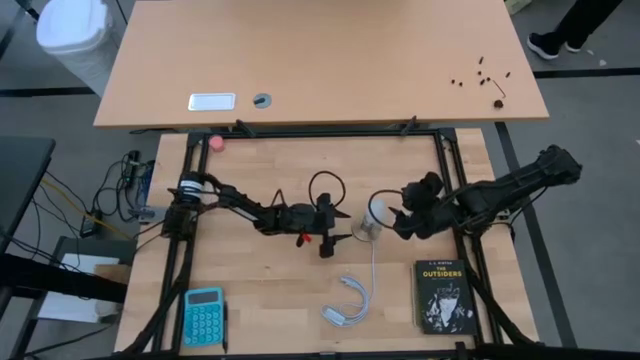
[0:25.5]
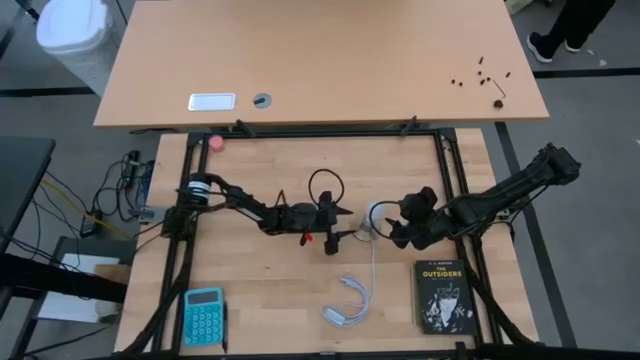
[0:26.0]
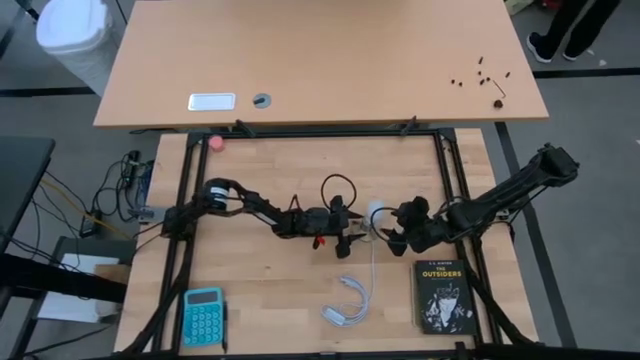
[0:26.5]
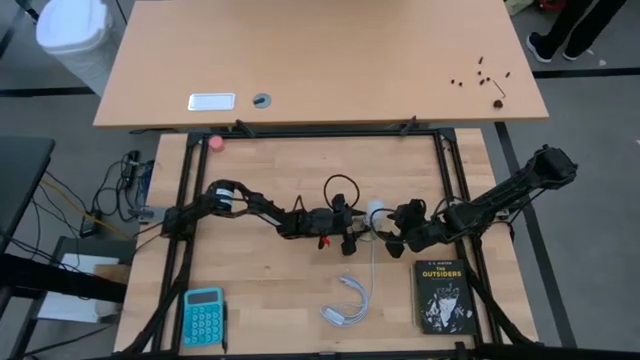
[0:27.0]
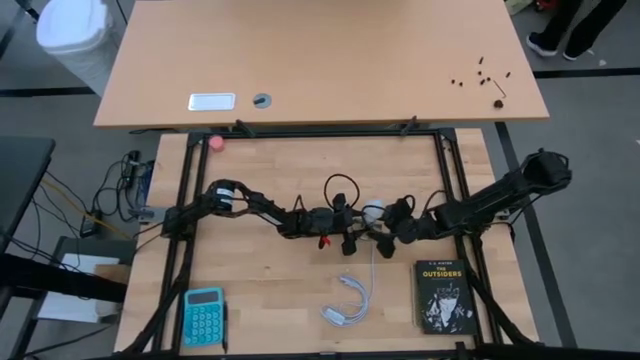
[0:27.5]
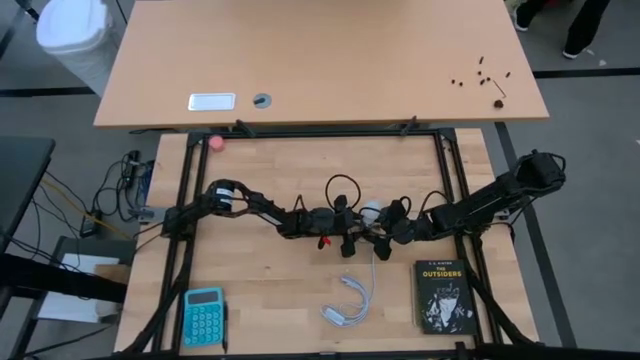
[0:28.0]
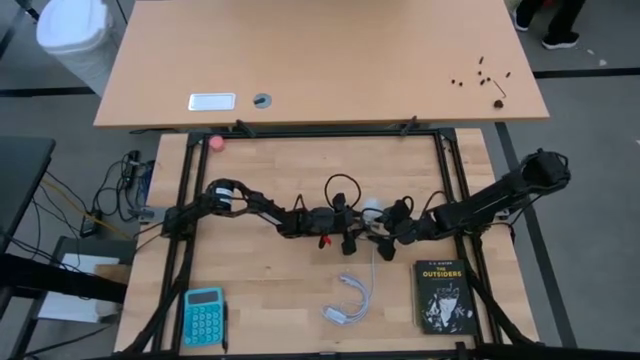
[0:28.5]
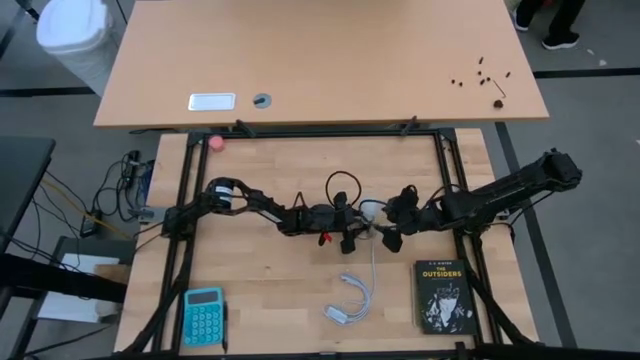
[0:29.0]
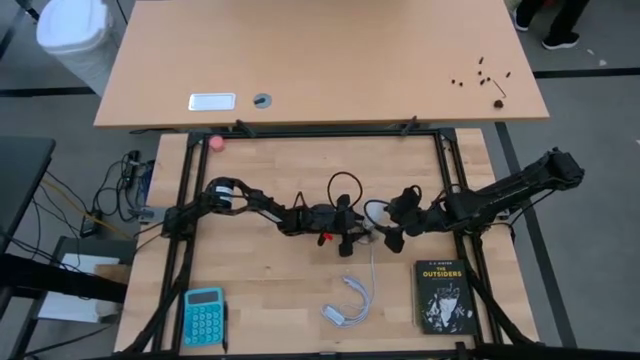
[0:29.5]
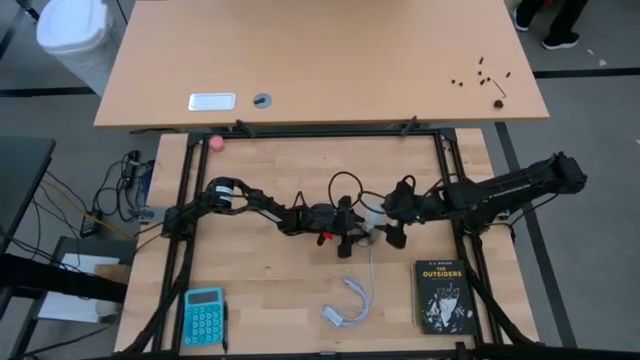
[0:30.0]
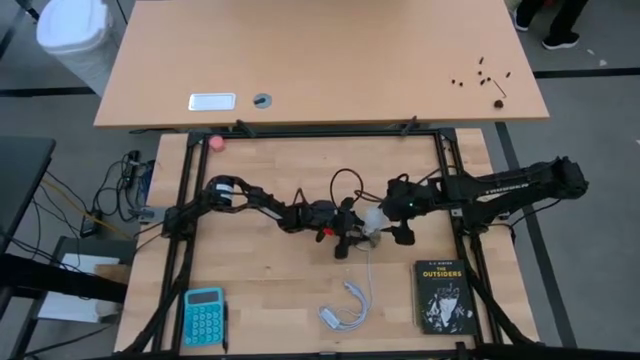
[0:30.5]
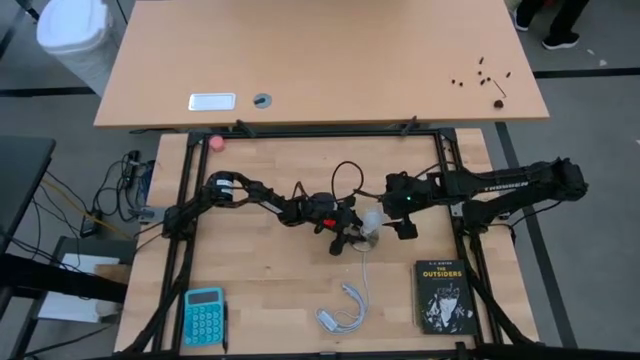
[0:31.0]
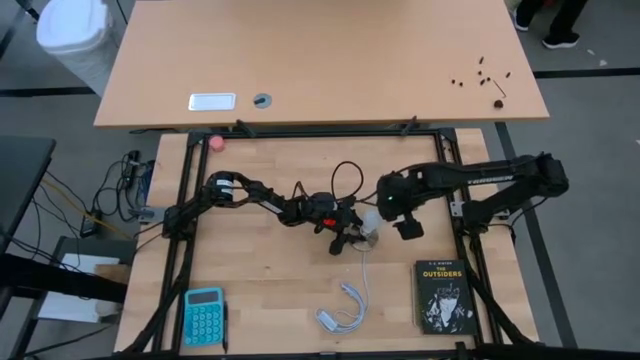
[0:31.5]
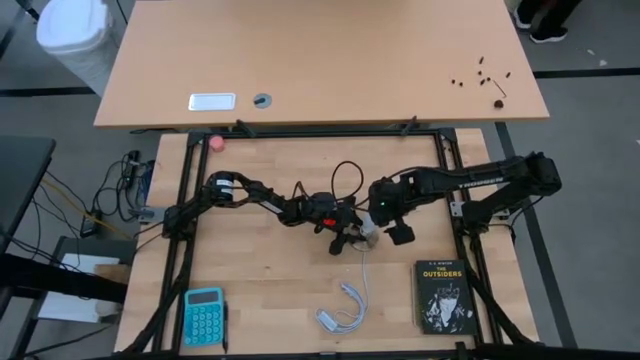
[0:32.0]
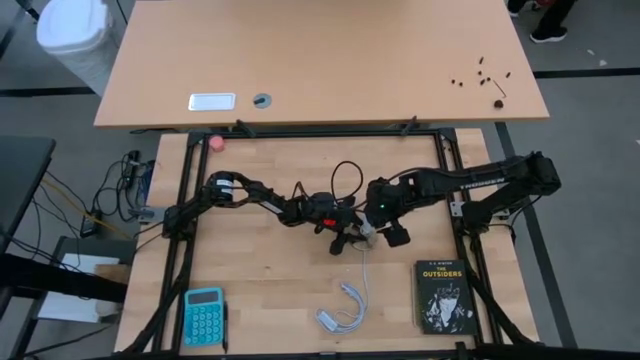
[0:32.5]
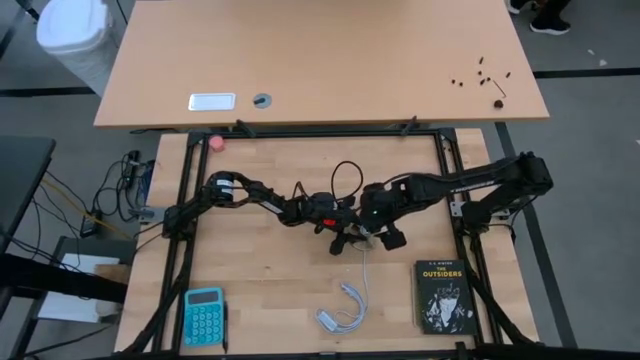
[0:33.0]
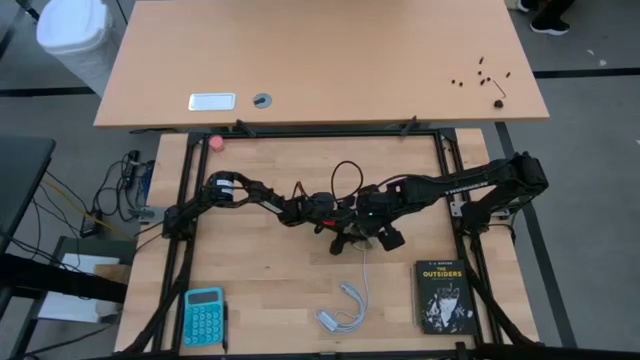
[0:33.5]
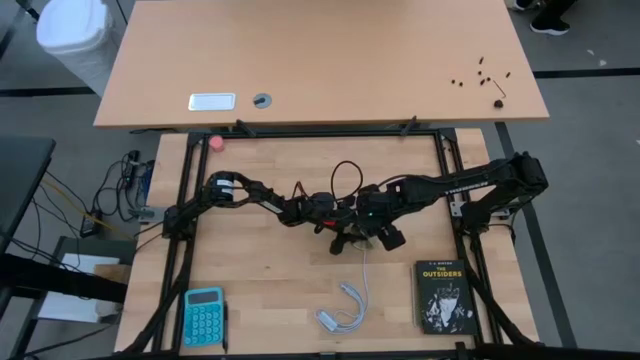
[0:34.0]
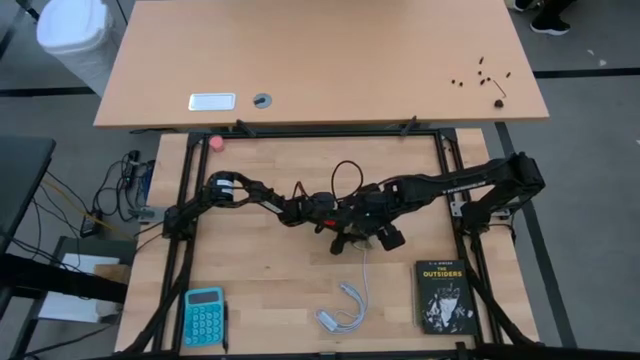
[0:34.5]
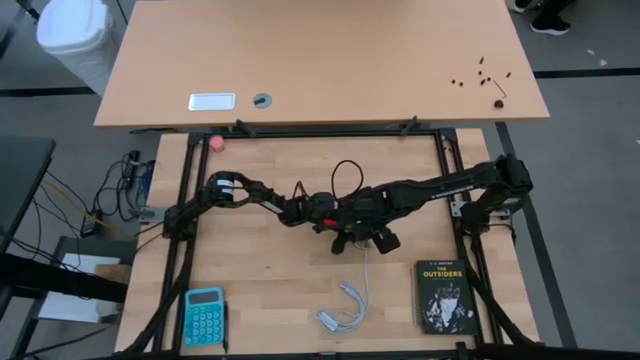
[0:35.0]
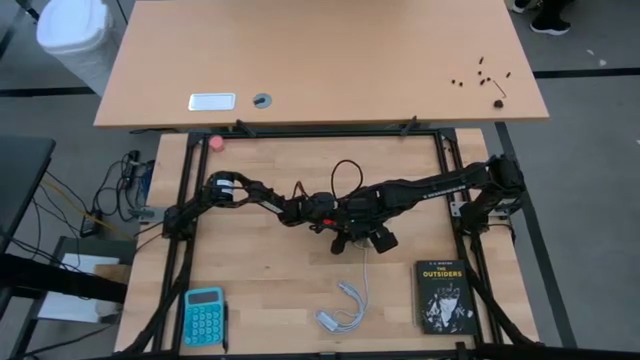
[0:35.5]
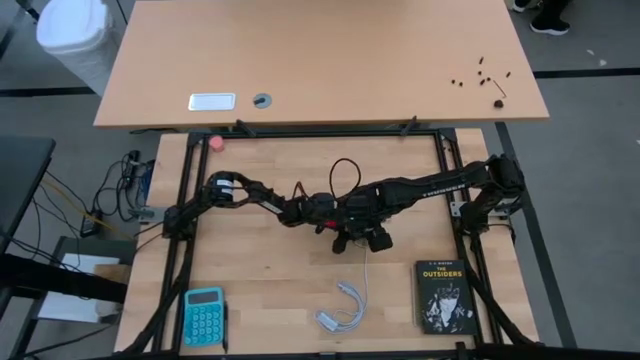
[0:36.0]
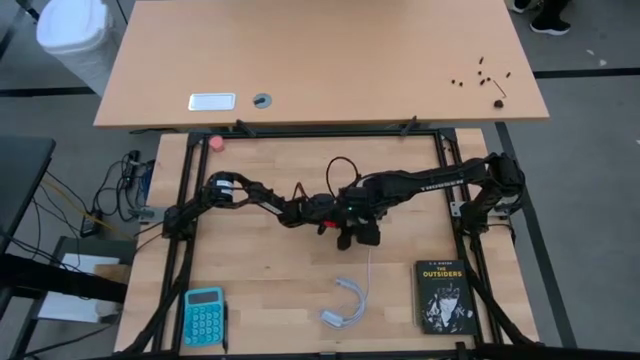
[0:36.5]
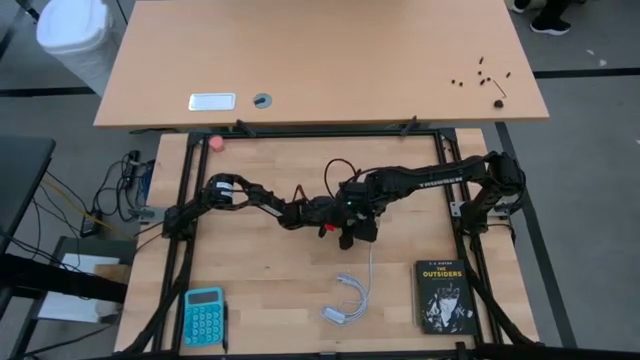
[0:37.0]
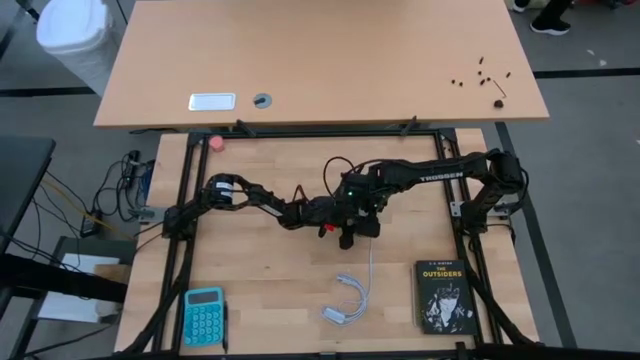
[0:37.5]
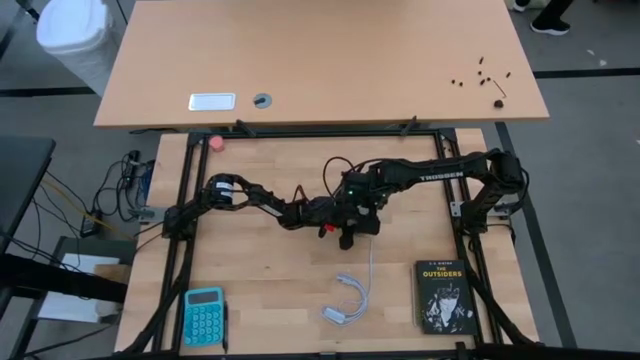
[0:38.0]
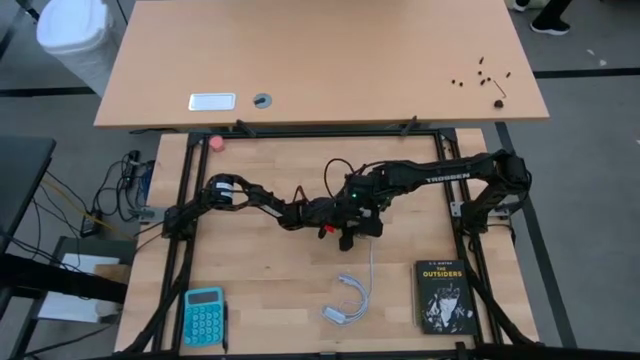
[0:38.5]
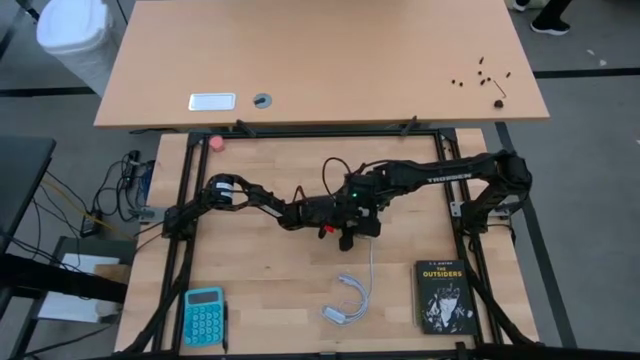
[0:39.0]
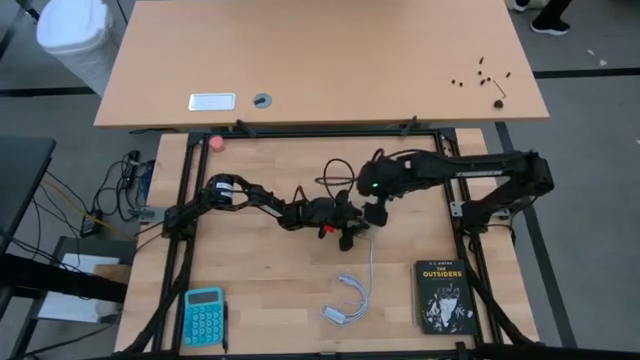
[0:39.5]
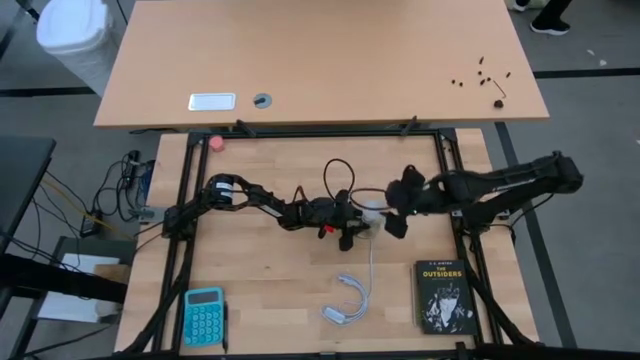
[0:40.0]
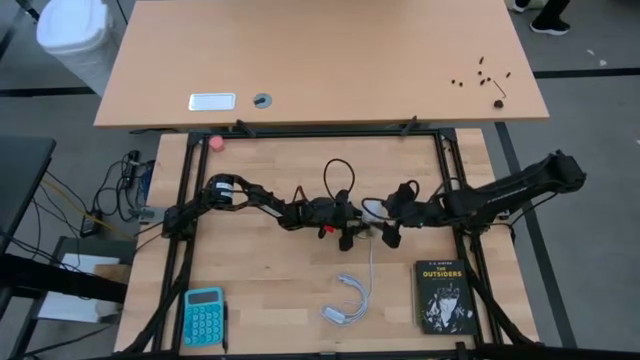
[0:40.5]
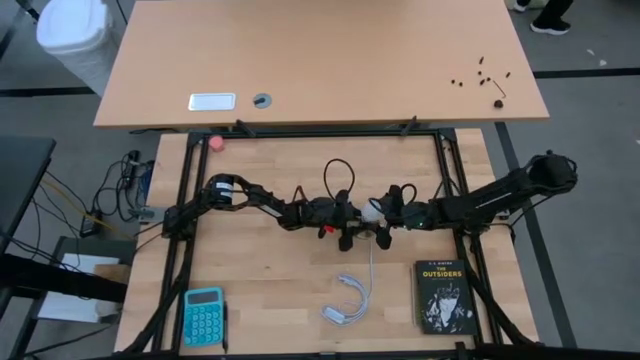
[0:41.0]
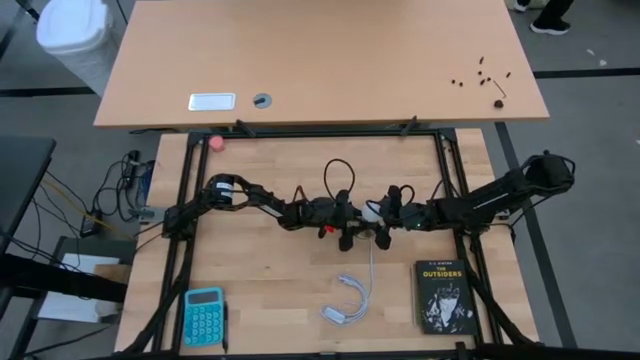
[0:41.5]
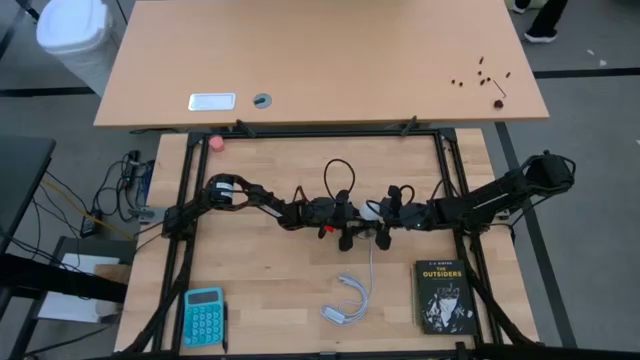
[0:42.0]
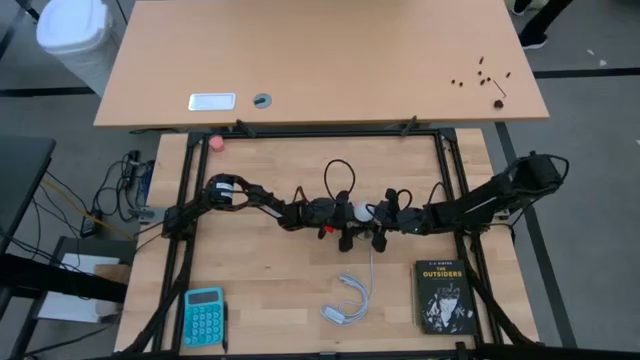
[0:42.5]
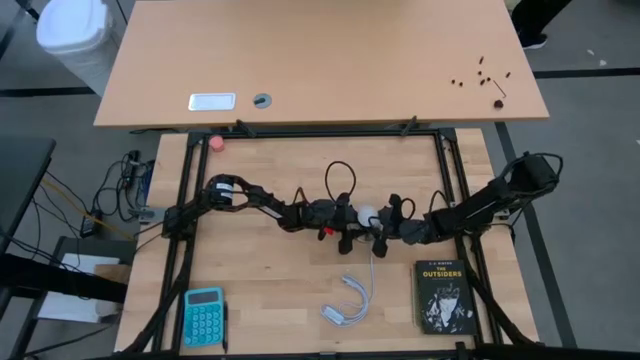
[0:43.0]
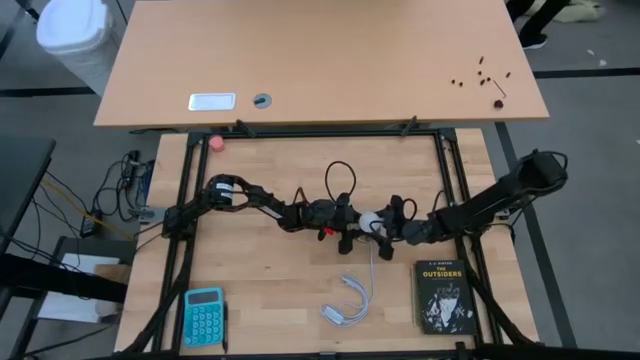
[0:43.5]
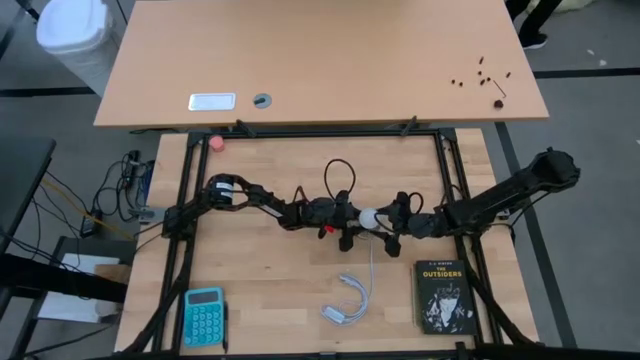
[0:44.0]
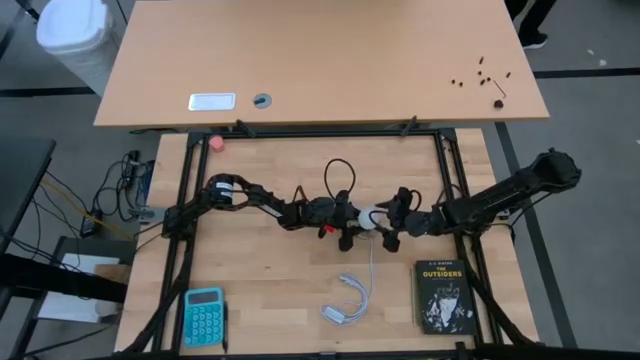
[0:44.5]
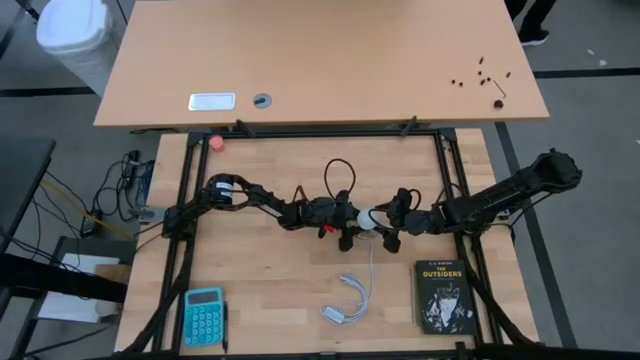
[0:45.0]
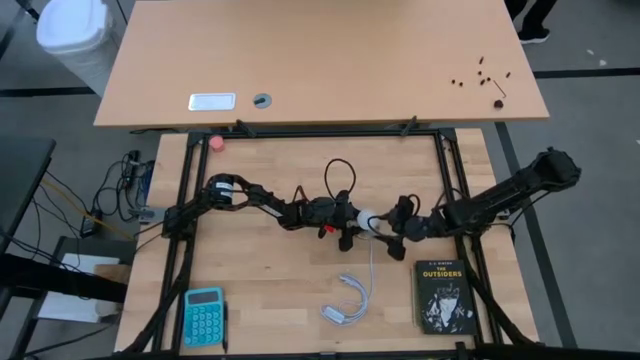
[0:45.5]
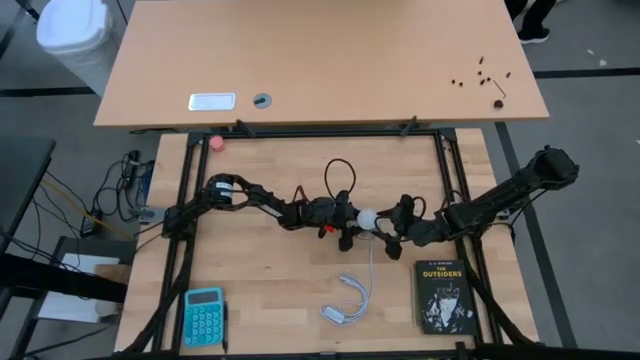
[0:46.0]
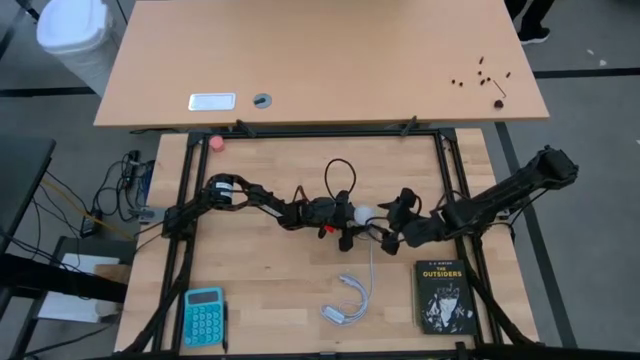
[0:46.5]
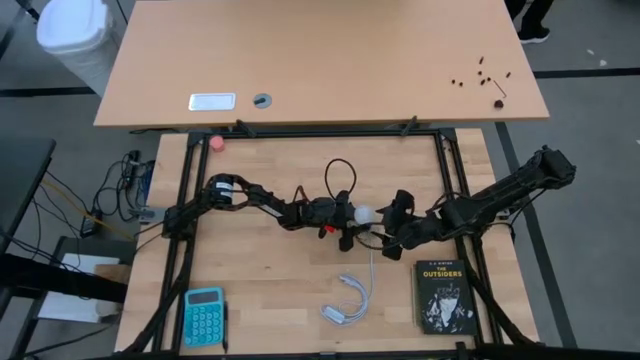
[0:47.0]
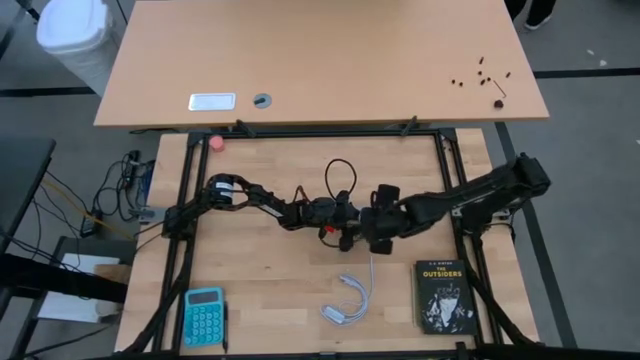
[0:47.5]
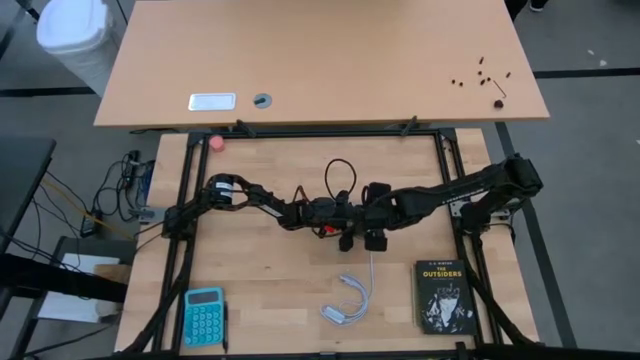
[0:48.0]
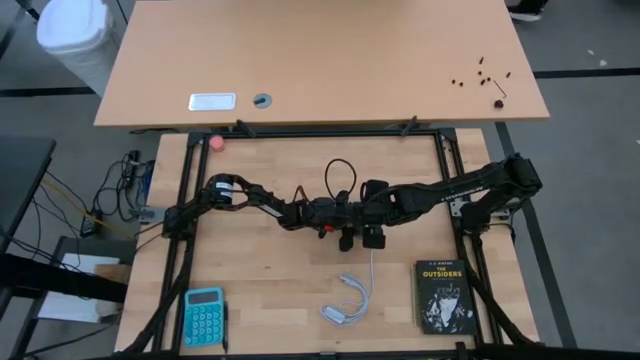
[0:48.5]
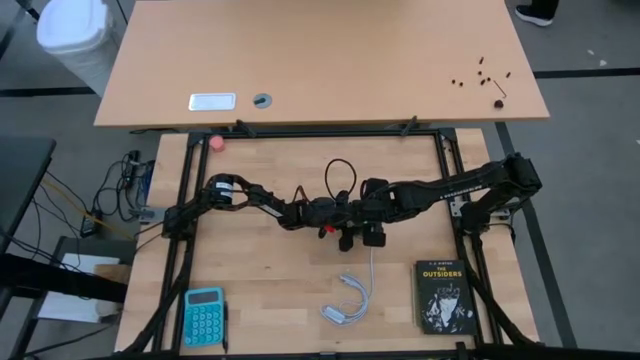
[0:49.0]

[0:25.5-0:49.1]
Task: Screw lightbulb
Insert the white lightbulb into the silver lamp
